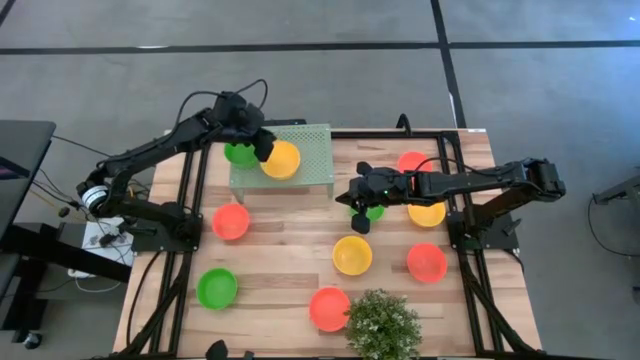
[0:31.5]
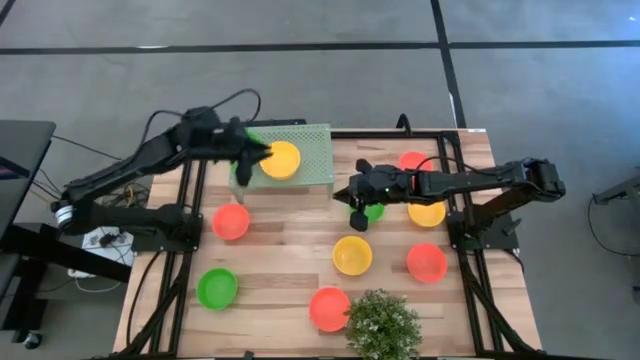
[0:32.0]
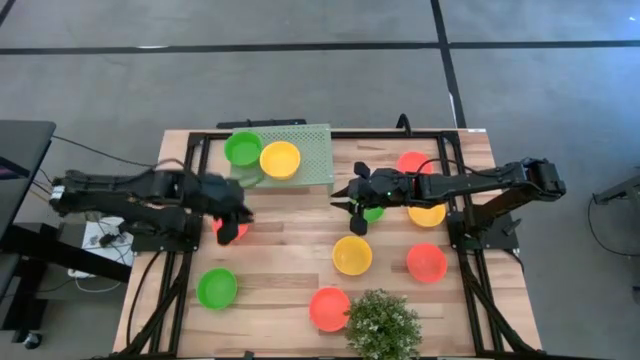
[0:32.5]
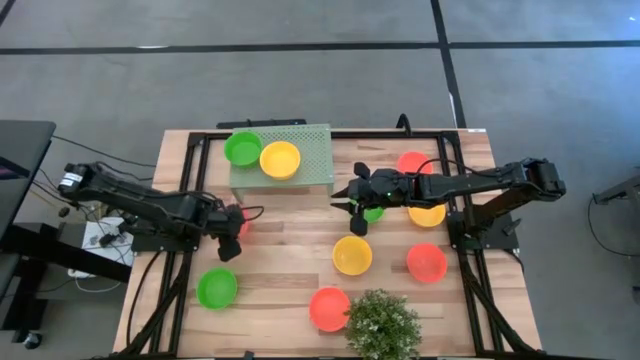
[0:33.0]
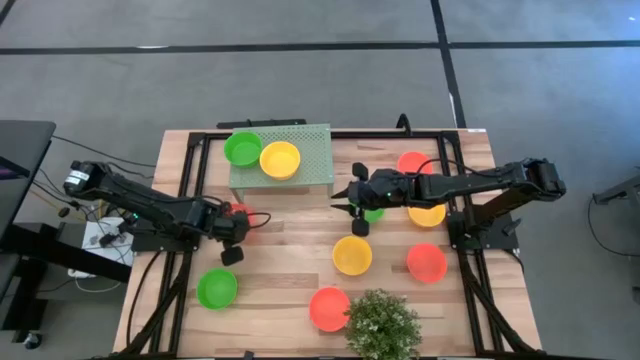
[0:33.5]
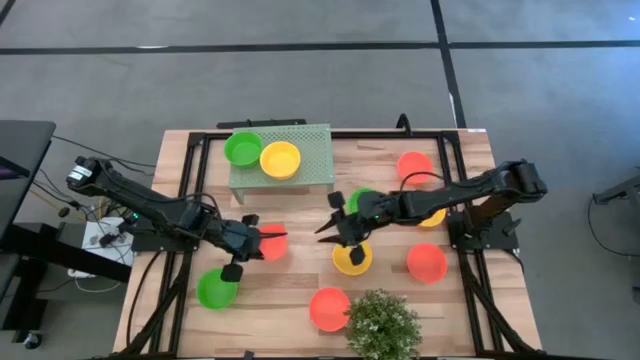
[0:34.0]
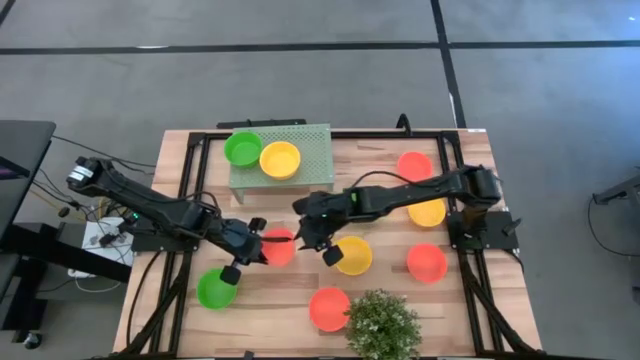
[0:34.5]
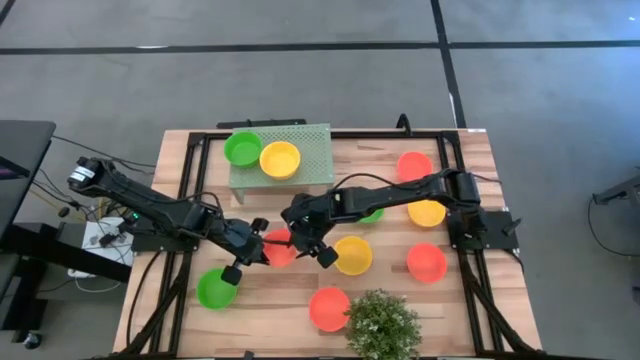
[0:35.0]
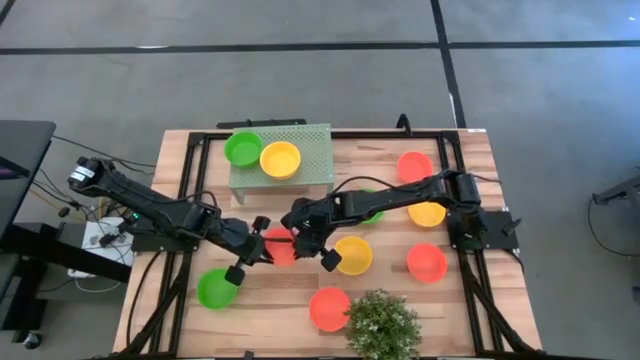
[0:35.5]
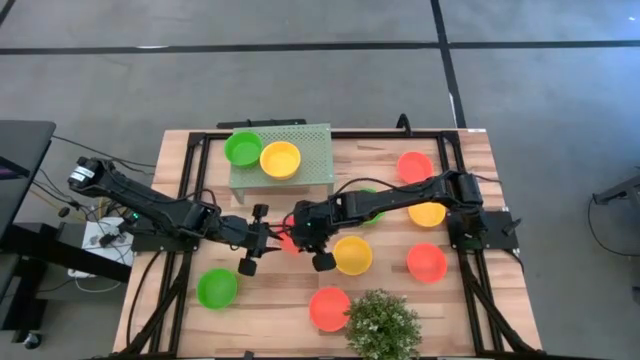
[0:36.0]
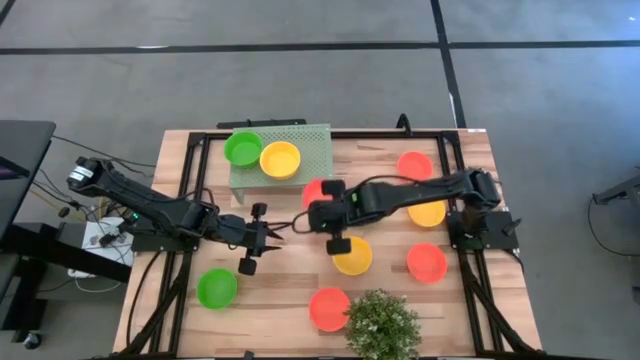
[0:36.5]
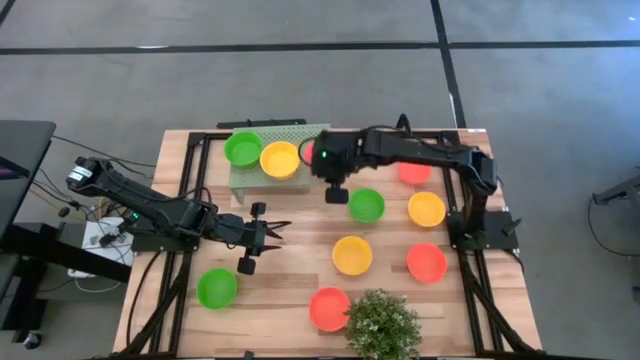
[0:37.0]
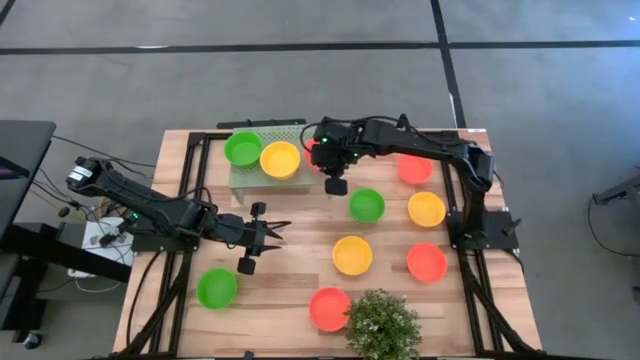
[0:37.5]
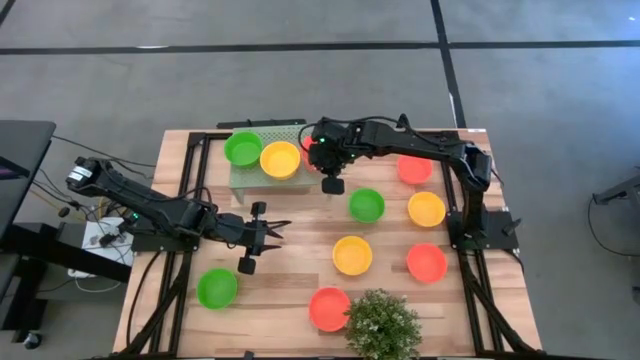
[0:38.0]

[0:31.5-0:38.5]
Task: Pick & Place Mini bowls
Put the orange bowl on the shelf

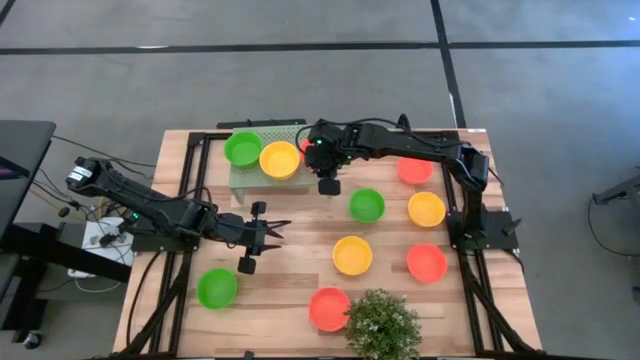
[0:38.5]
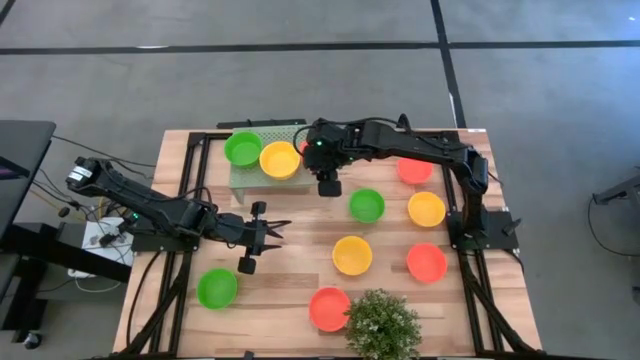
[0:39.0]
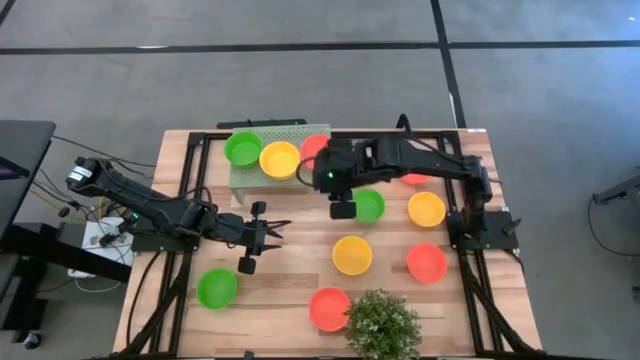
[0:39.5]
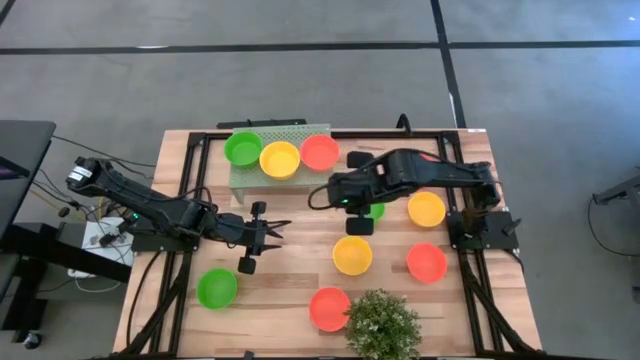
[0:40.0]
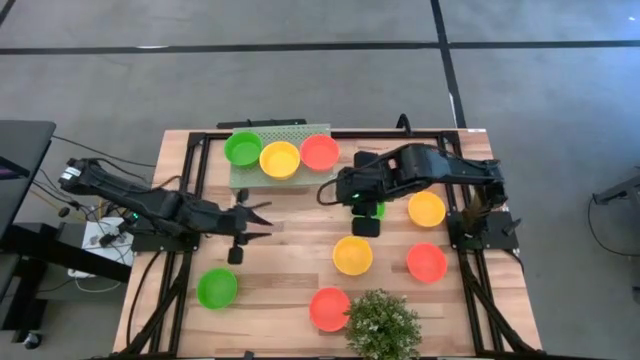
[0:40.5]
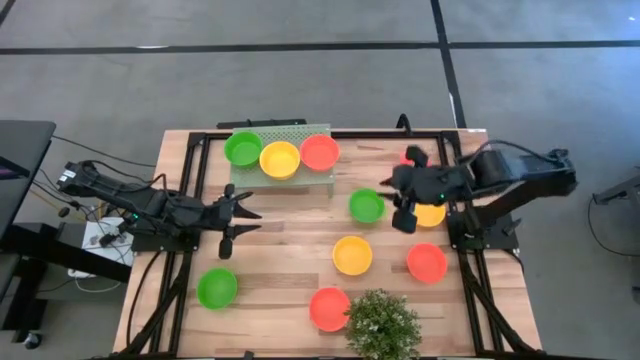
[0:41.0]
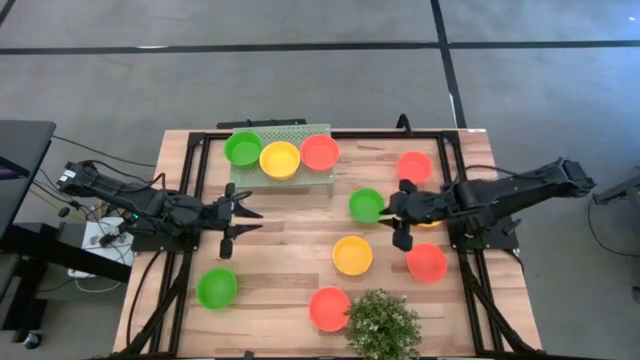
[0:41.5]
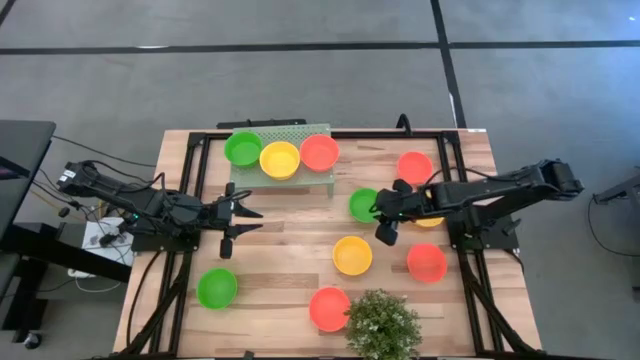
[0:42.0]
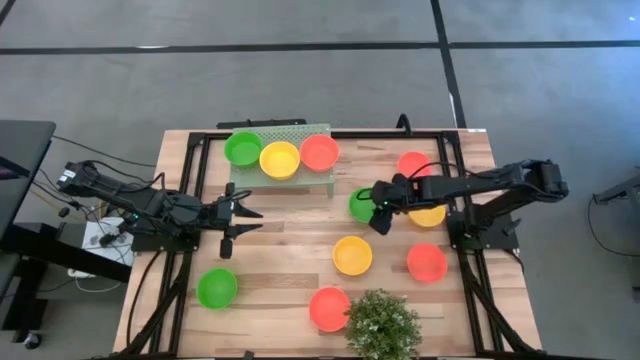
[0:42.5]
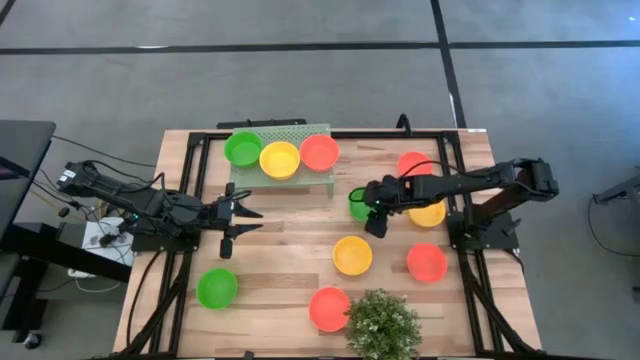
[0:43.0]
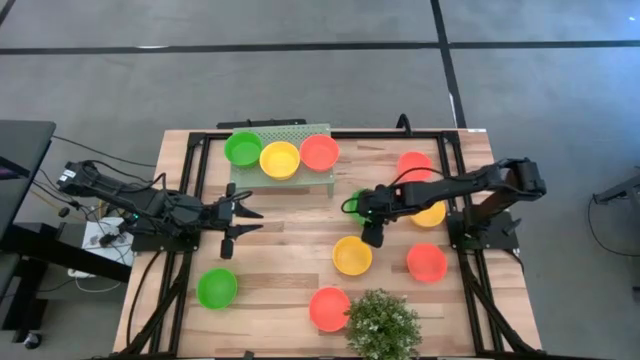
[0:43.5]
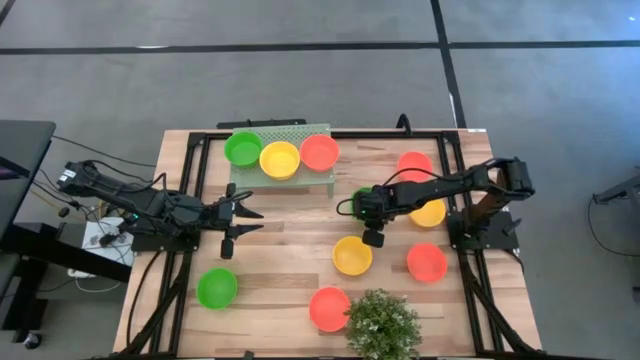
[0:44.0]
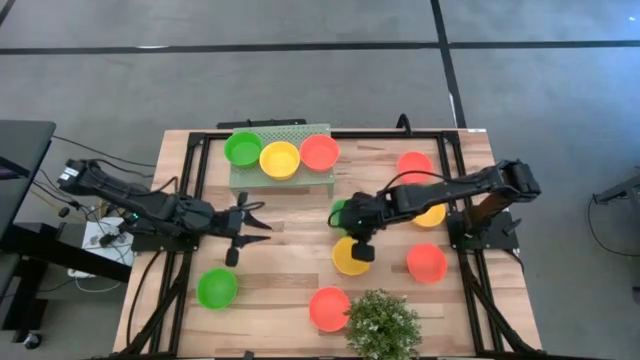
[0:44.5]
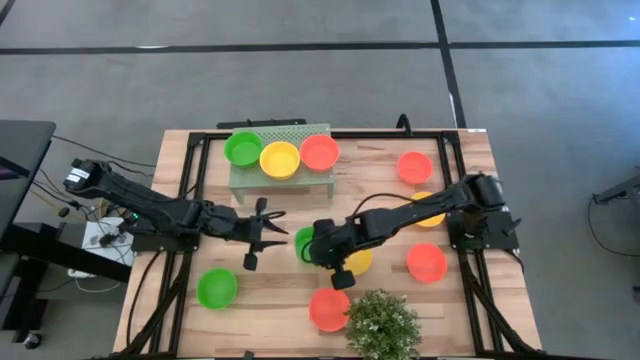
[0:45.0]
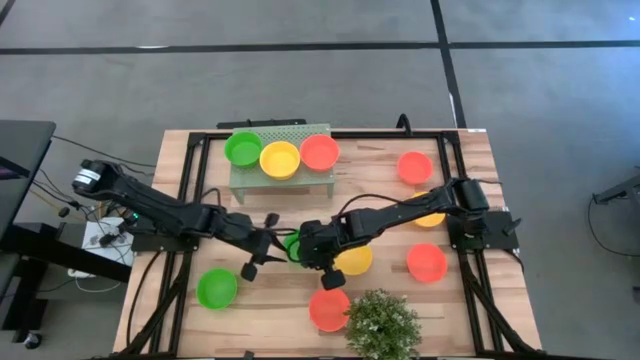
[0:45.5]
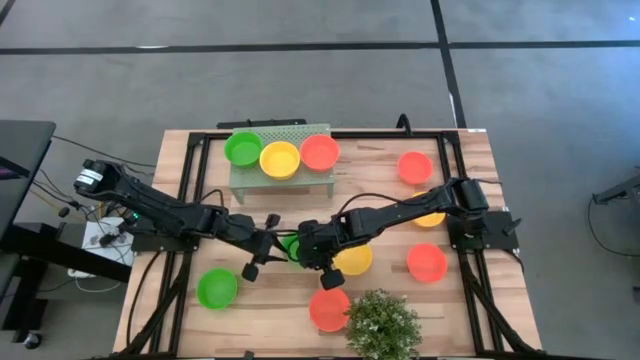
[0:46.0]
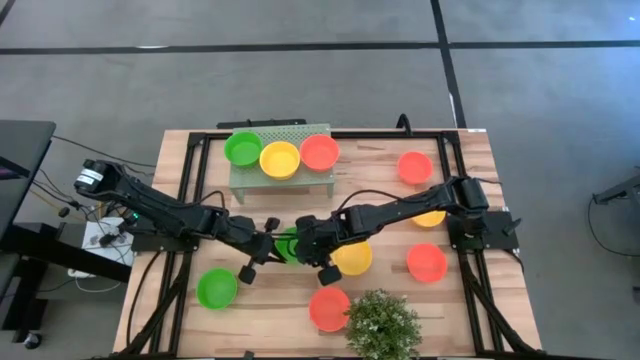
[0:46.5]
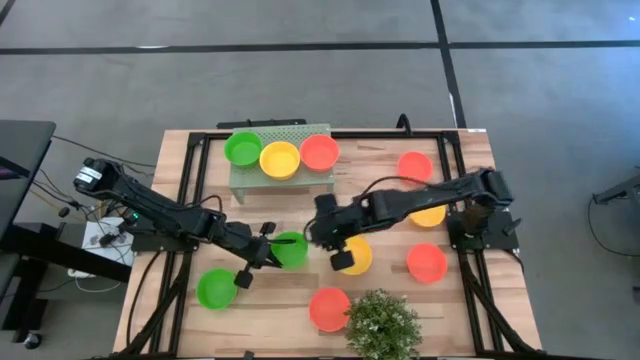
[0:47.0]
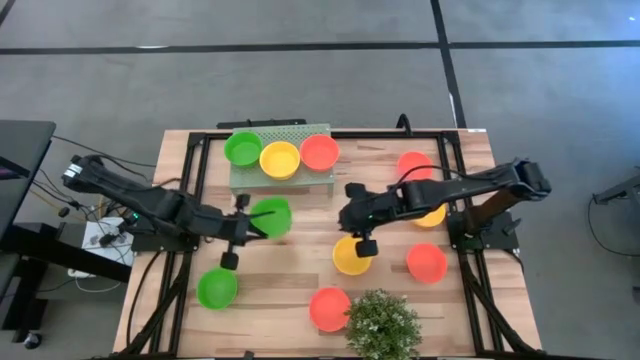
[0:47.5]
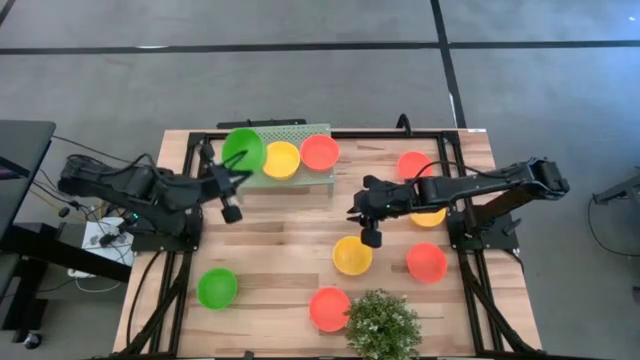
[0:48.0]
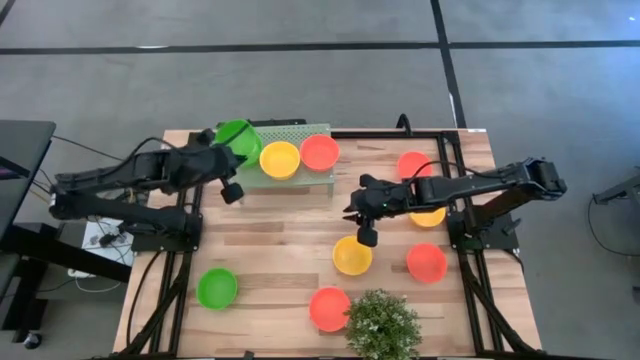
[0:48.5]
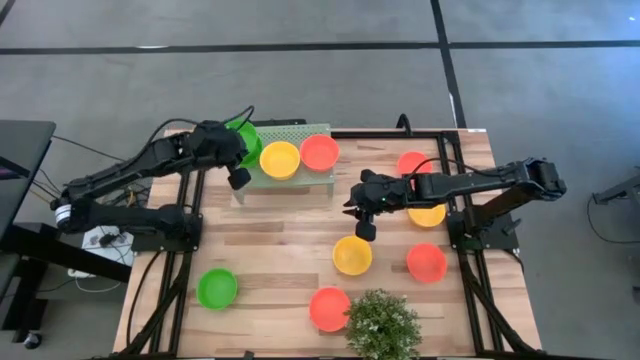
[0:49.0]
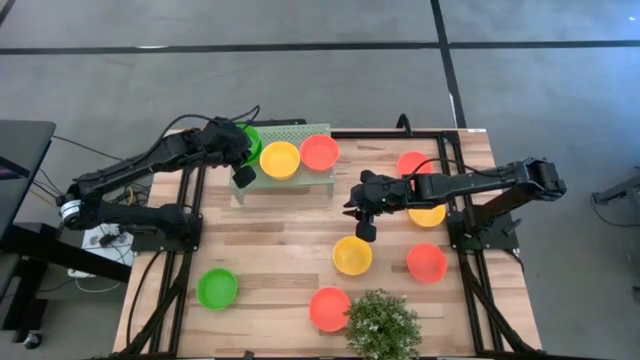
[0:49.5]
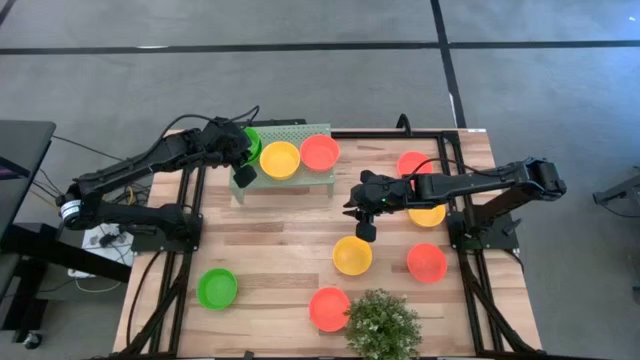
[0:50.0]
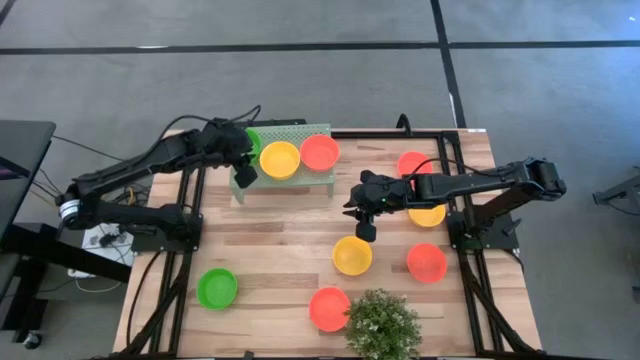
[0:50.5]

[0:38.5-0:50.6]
Stack the green bowl on top of the green bowl on the shelf

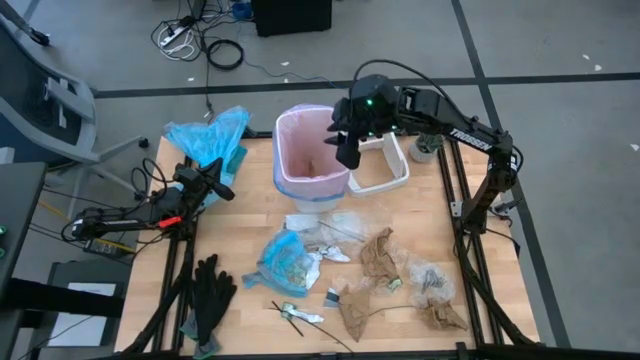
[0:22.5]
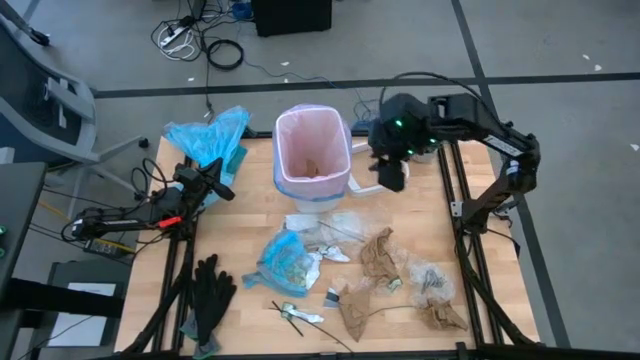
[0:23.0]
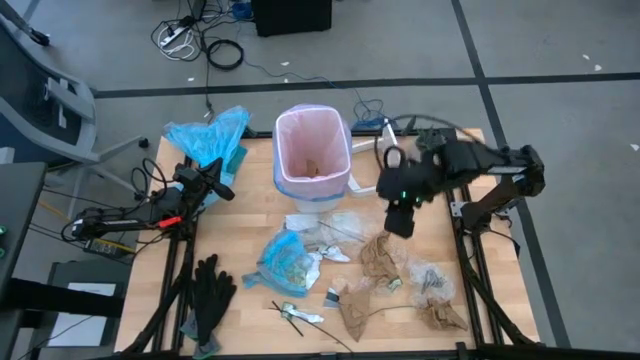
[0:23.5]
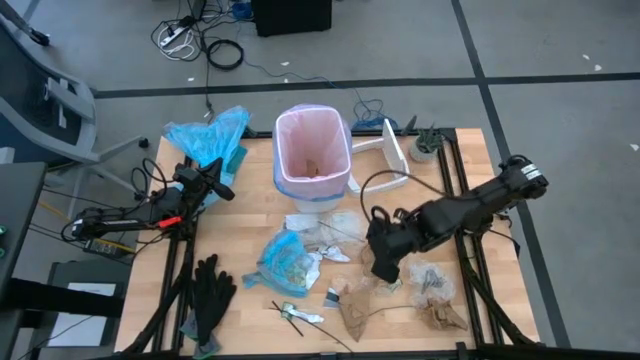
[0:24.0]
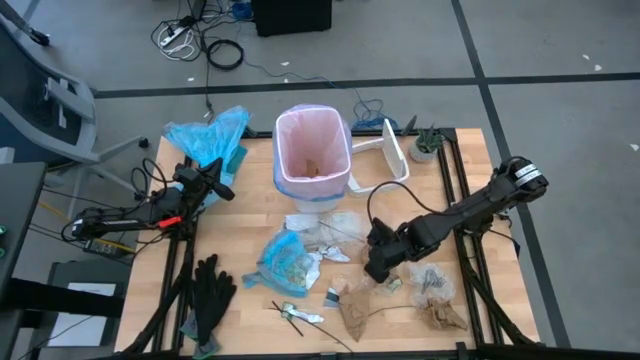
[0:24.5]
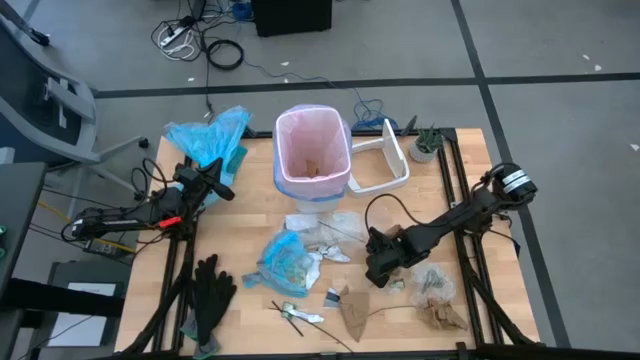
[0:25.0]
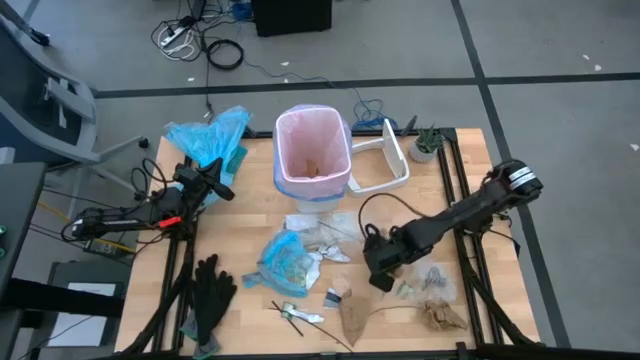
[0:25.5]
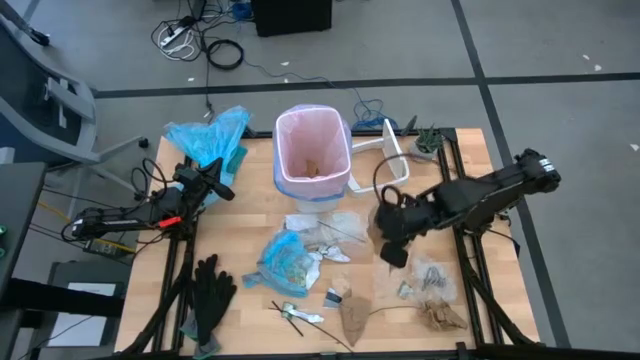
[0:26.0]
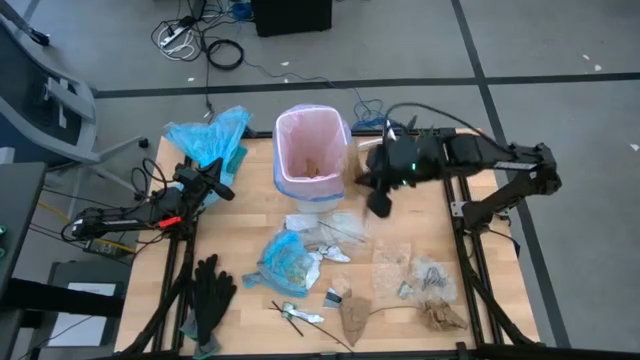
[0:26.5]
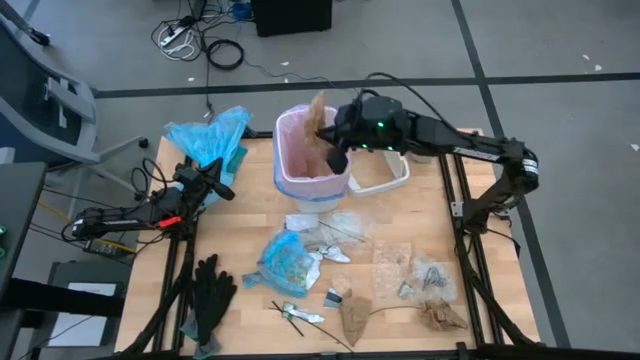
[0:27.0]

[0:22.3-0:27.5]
Task: place trash/remove bag and relplace
Put the top center brown napkin into the trash bin
